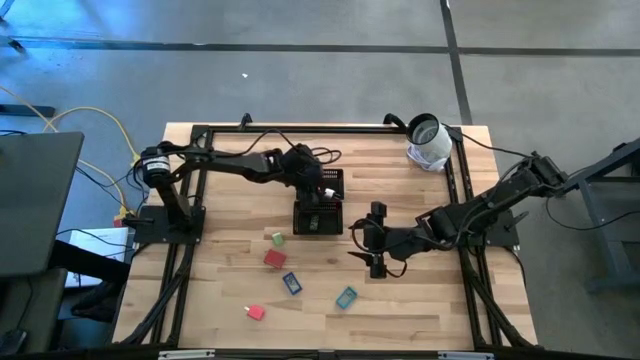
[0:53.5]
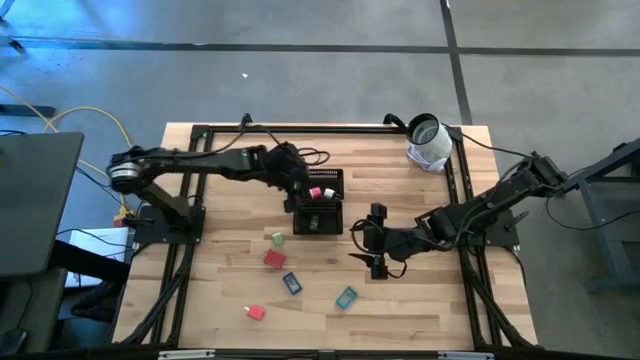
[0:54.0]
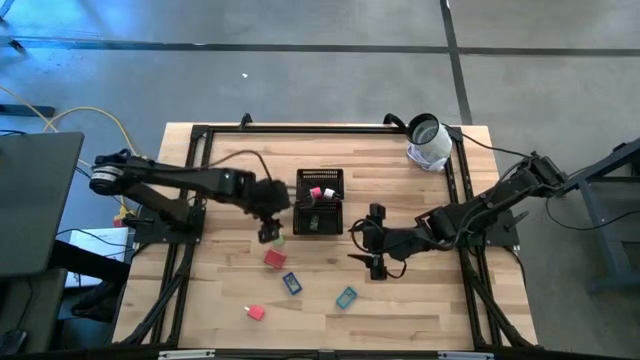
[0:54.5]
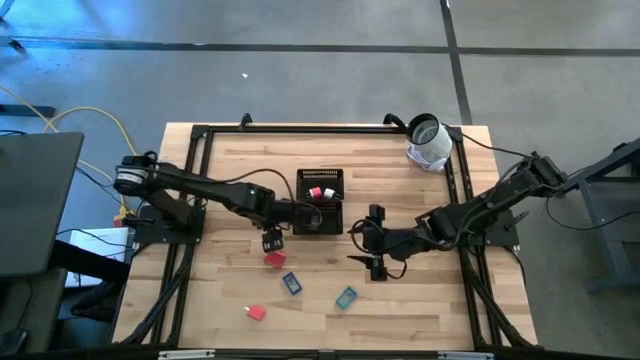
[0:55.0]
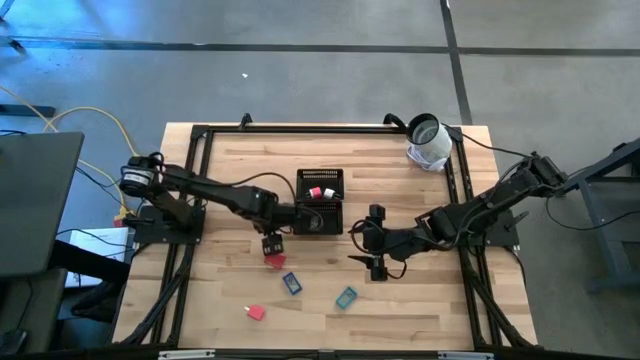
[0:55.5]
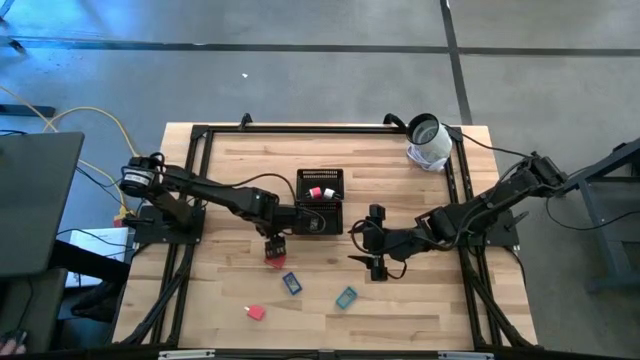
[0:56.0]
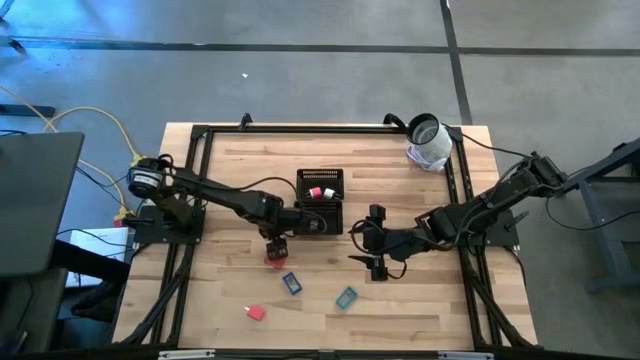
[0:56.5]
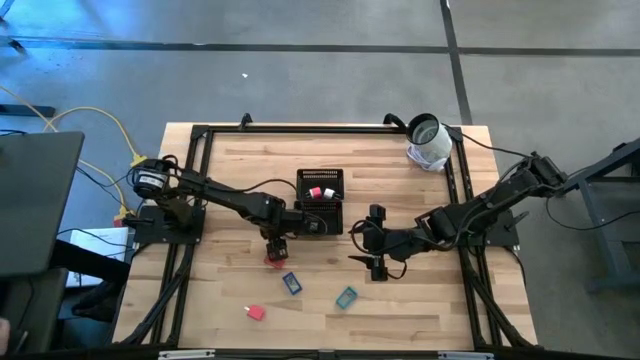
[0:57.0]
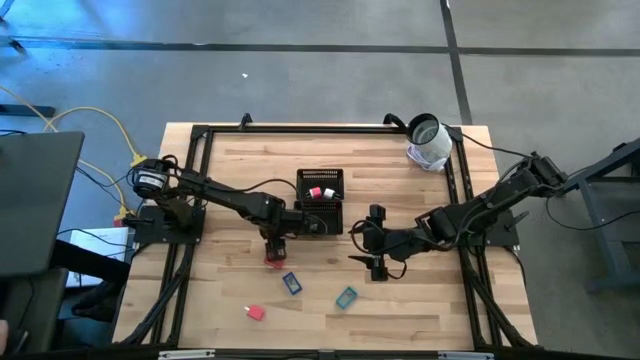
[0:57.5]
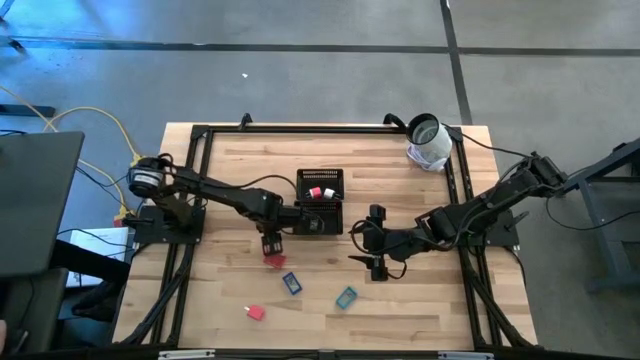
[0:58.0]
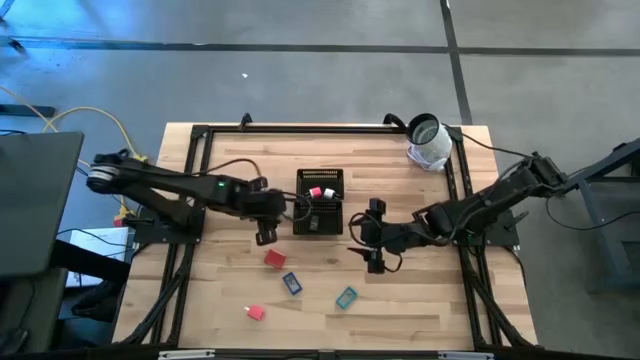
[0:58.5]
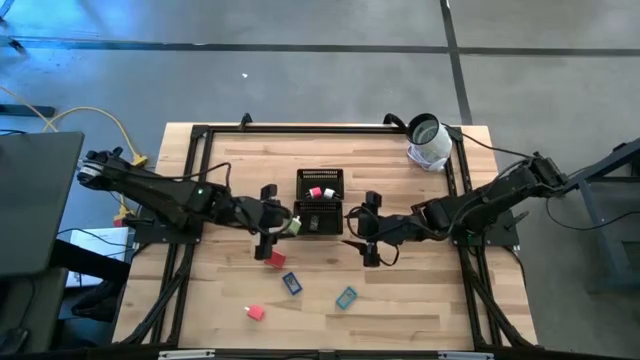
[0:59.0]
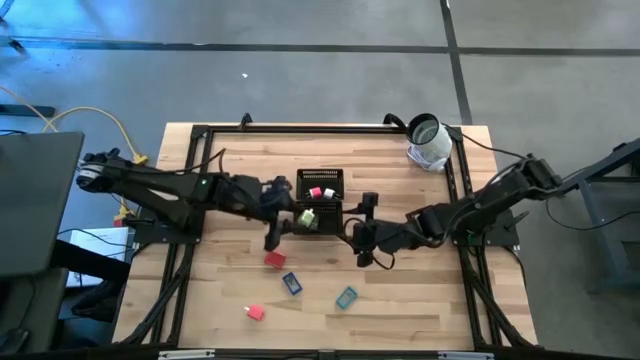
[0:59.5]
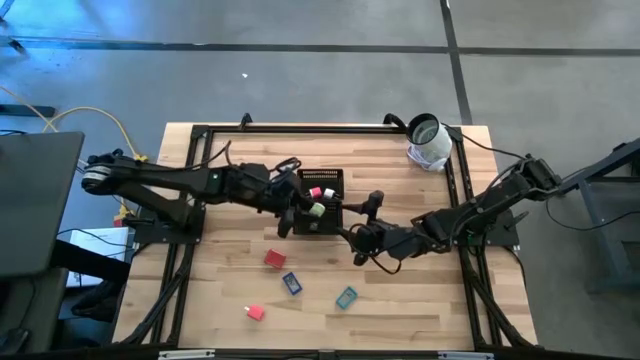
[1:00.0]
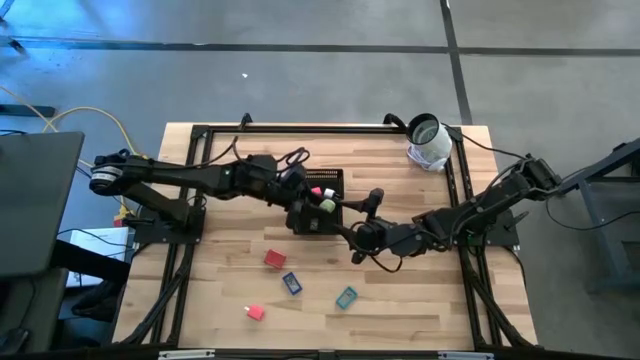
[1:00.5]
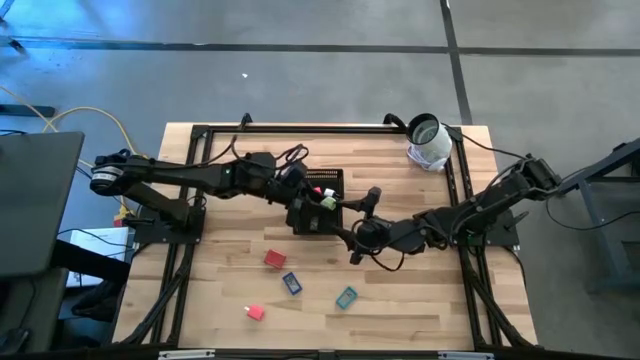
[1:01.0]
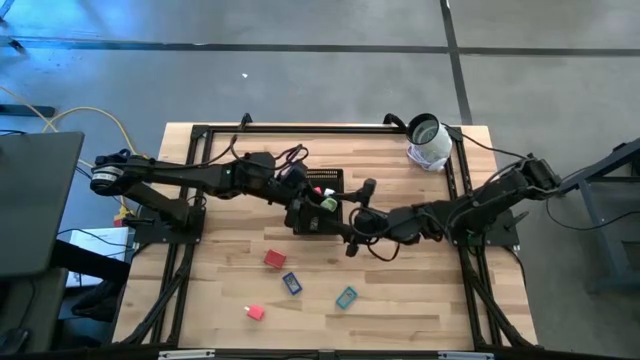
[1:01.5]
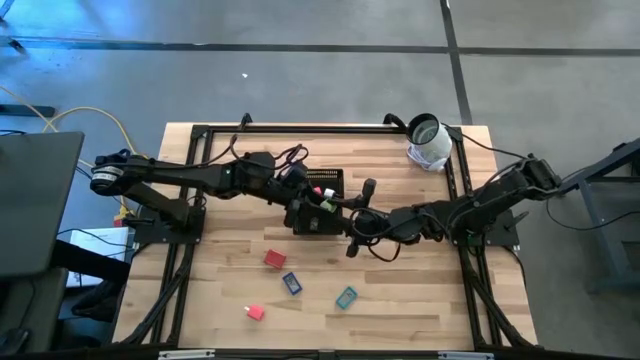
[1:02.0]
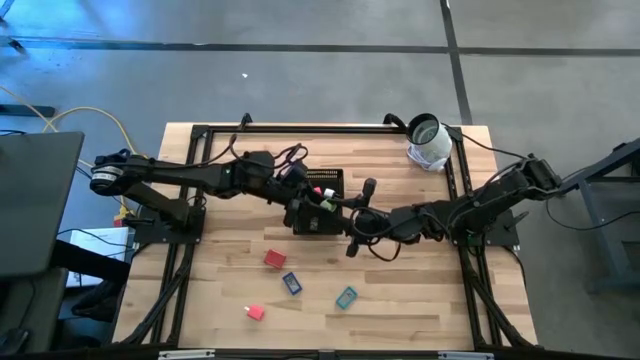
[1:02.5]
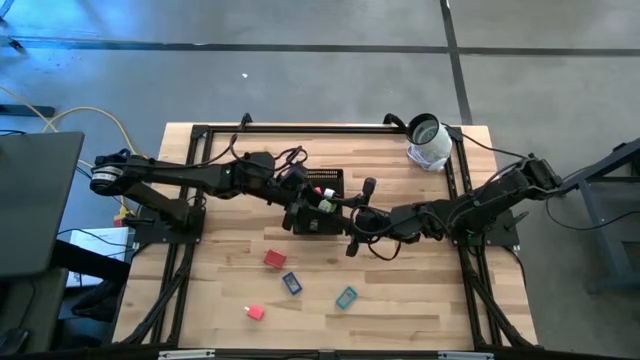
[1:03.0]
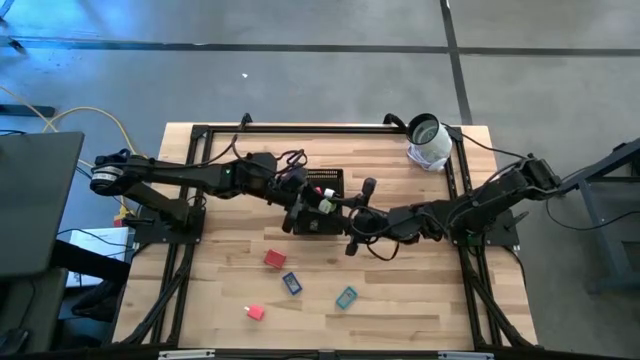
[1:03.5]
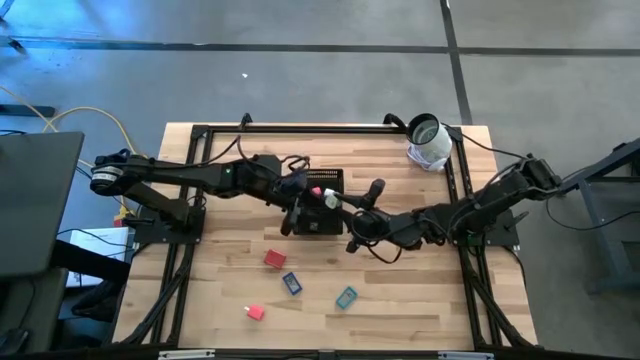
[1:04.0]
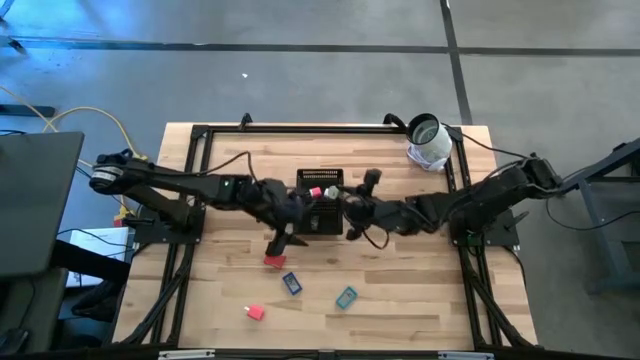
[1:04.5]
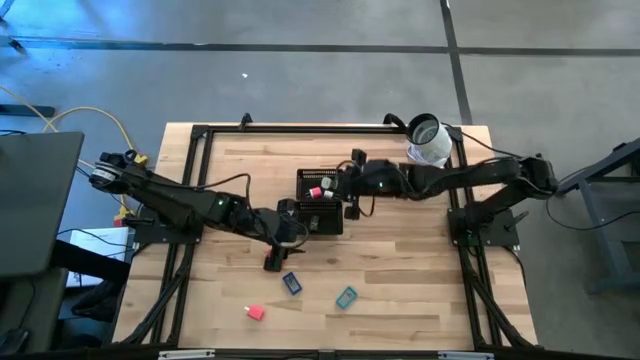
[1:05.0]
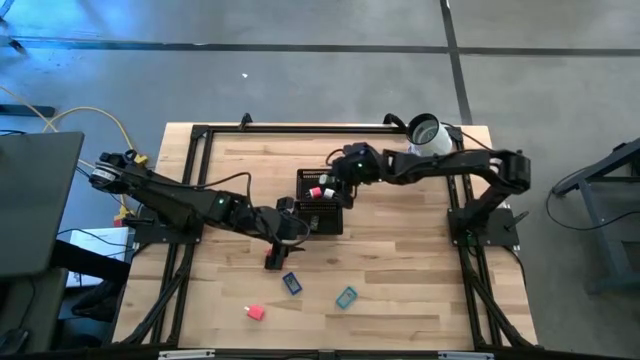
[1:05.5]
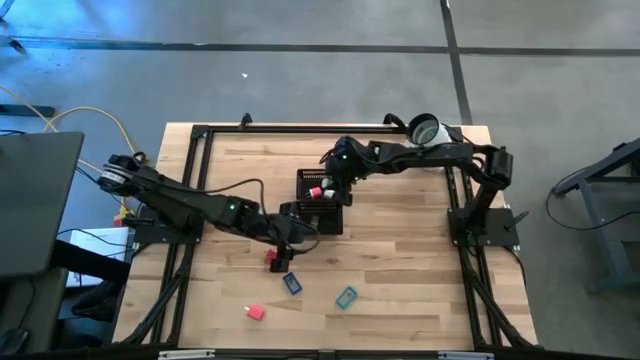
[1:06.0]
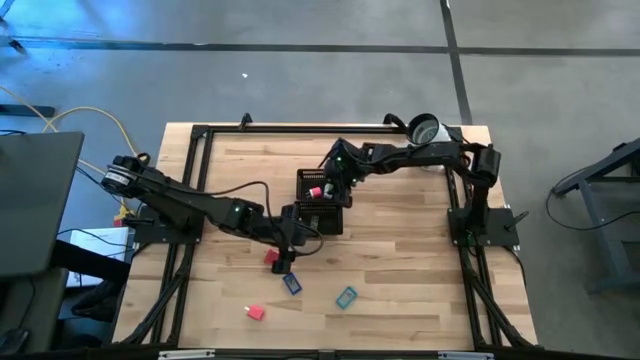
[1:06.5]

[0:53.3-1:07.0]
Task: Pick & Place Office items
Put the green charger adapter into the top black bin

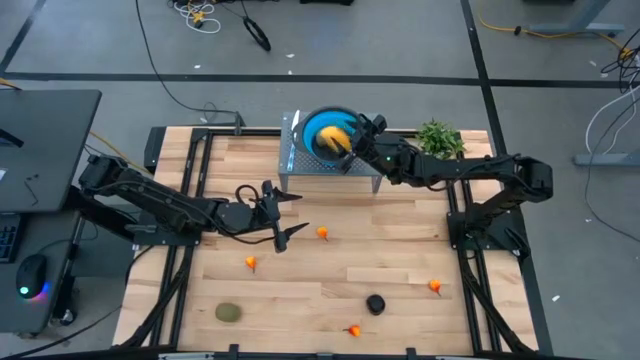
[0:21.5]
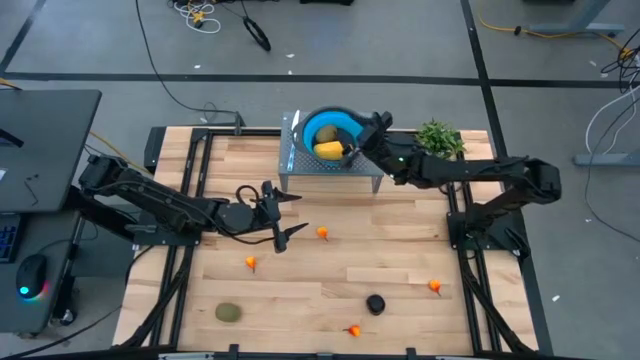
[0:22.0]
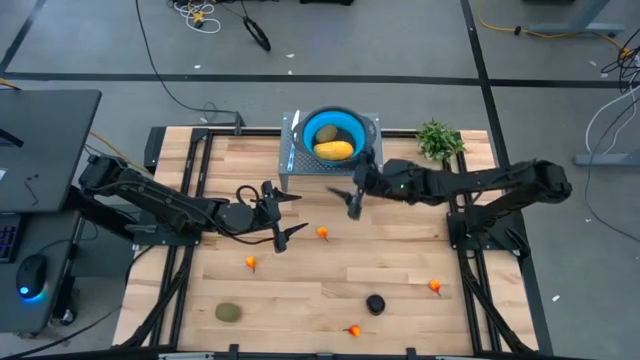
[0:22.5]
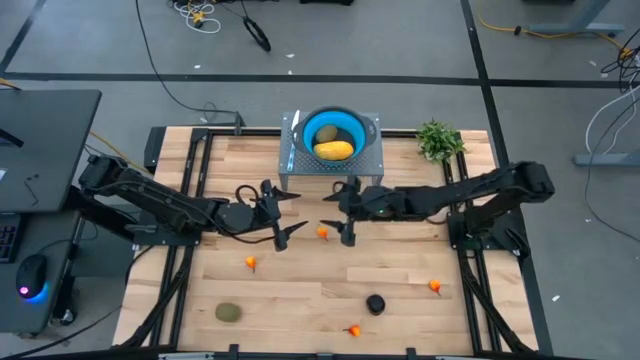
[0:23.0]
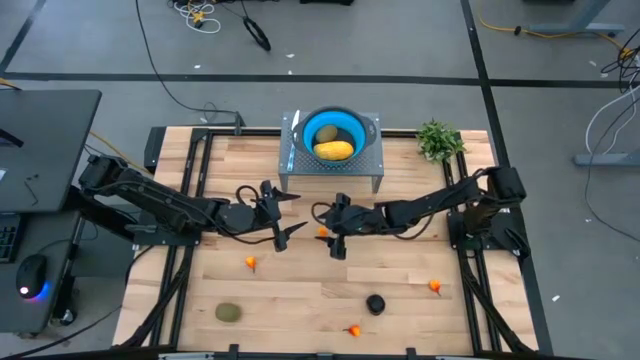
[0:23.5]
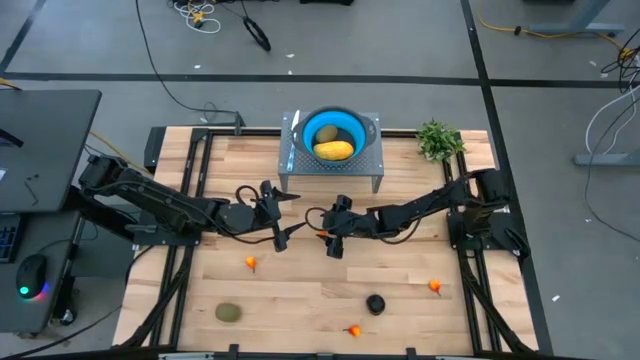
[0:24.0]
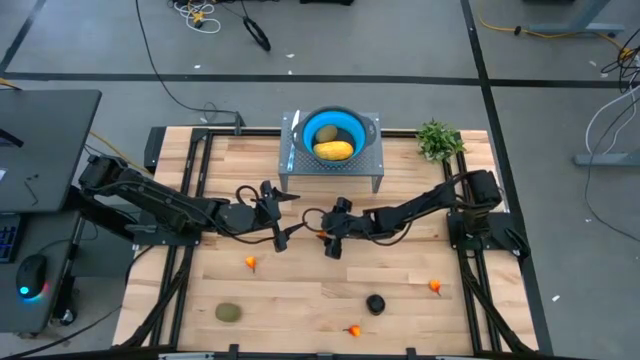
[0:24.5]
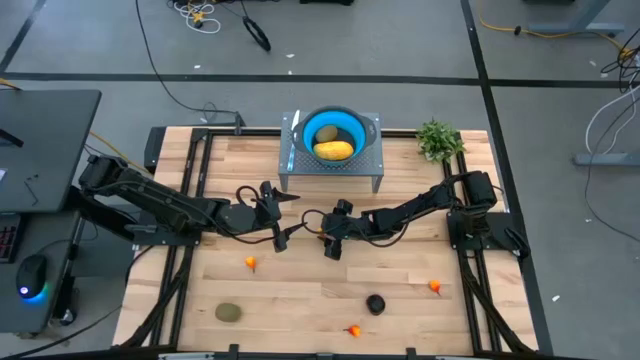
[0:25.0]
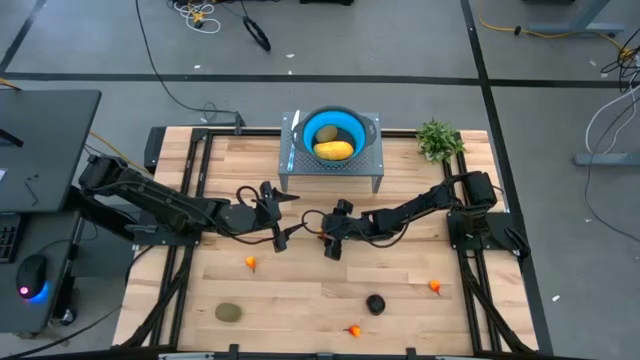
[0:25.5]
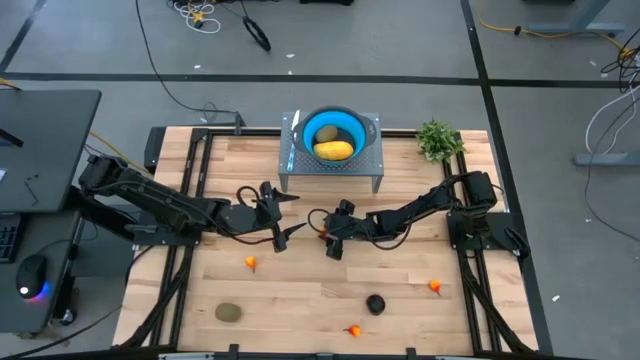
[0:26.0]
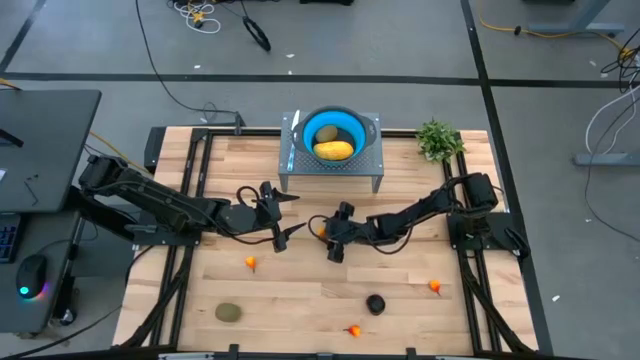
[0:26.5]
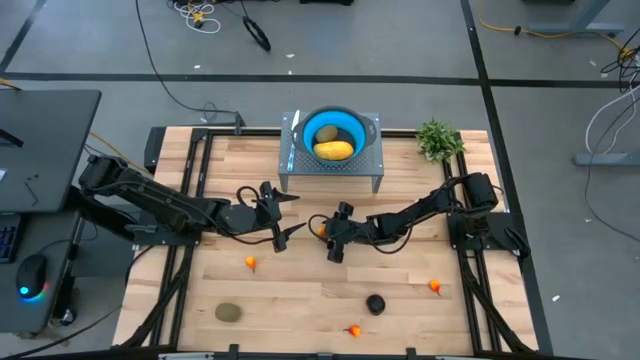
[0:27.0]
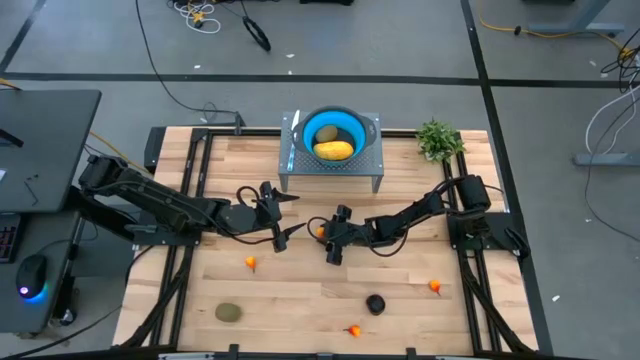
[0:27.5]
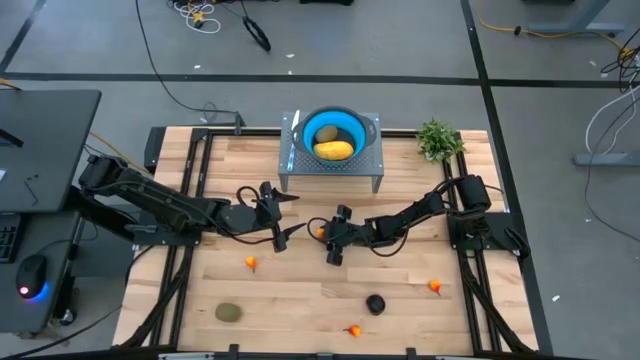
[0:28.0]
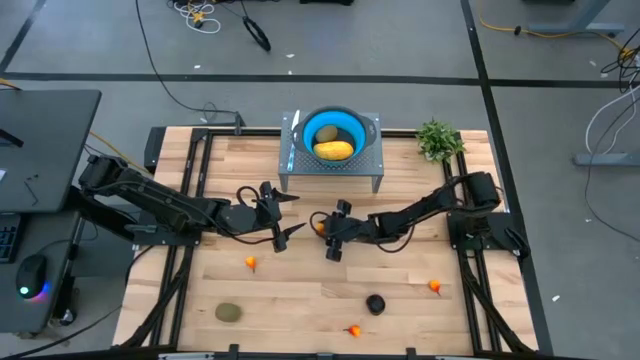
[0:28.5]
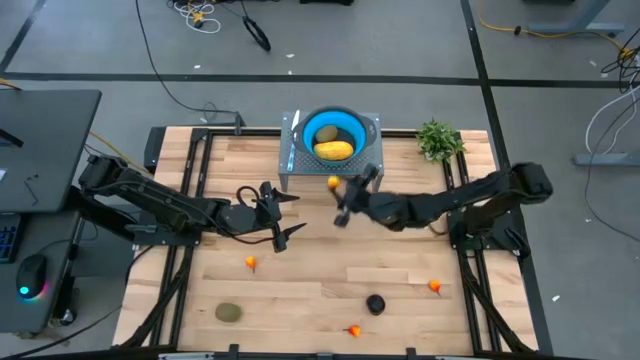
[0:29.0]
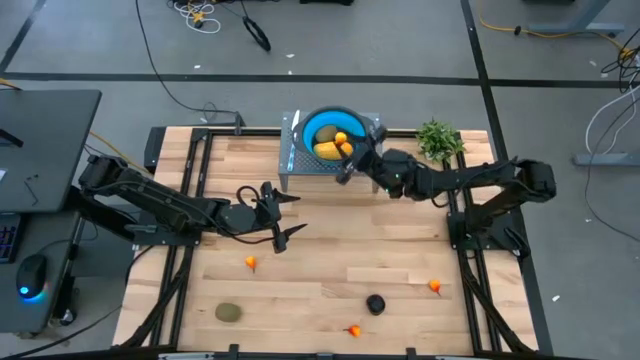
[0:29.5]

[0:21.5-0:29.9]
Task: Pick & Place Fruit
Put the orange pear into the blue strainer bowl
